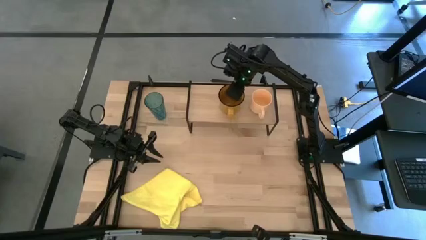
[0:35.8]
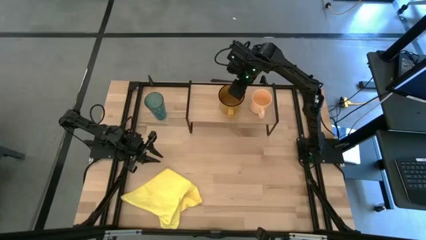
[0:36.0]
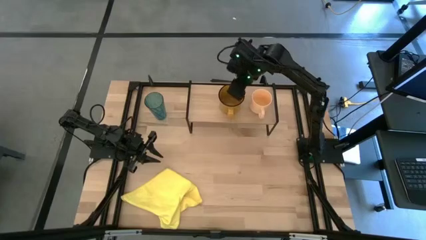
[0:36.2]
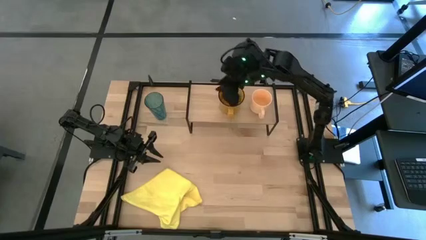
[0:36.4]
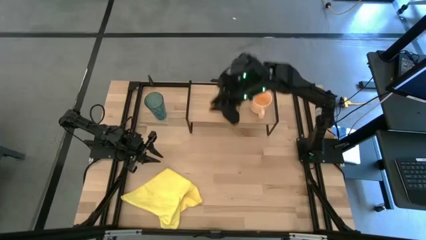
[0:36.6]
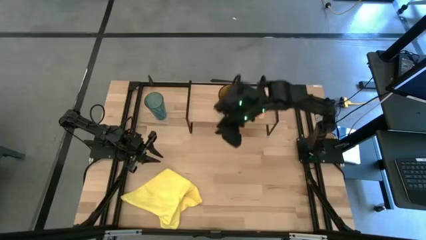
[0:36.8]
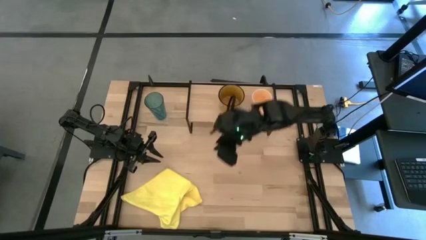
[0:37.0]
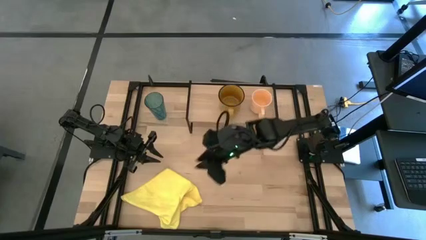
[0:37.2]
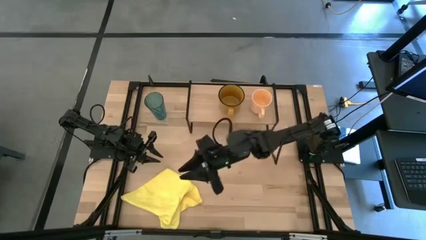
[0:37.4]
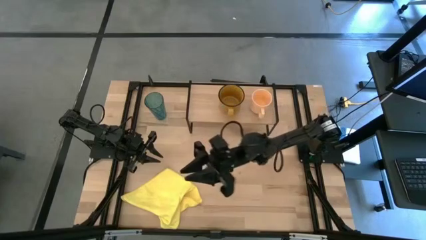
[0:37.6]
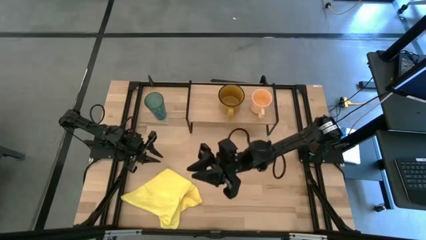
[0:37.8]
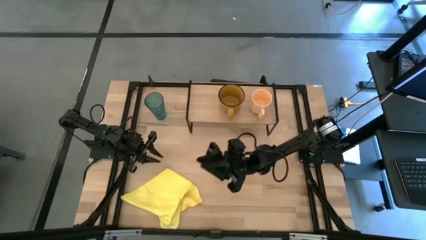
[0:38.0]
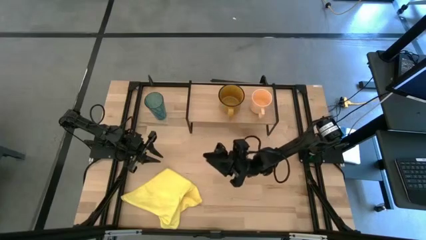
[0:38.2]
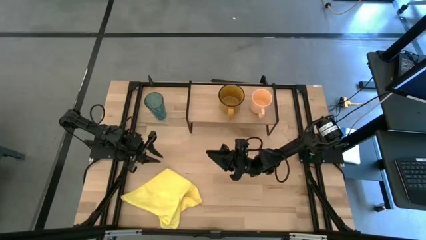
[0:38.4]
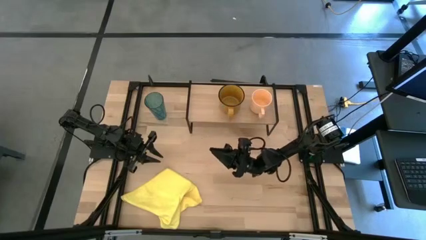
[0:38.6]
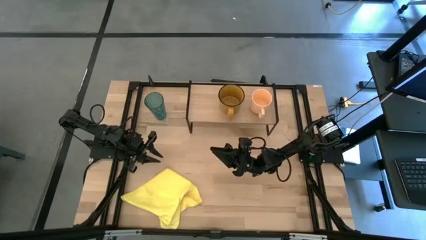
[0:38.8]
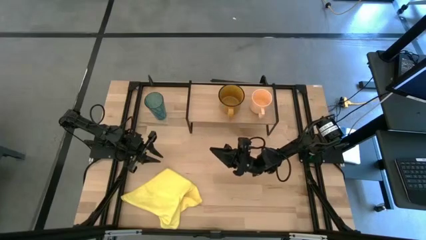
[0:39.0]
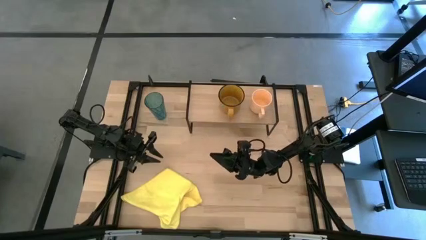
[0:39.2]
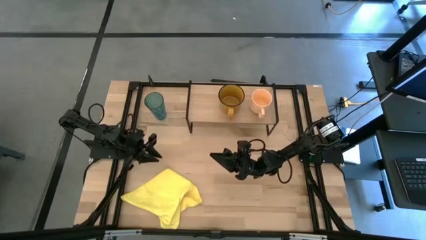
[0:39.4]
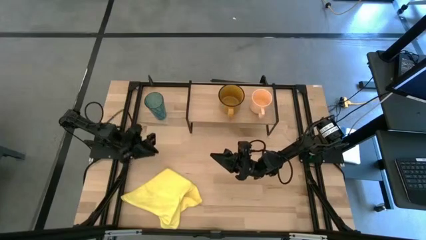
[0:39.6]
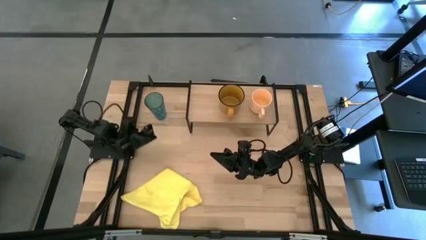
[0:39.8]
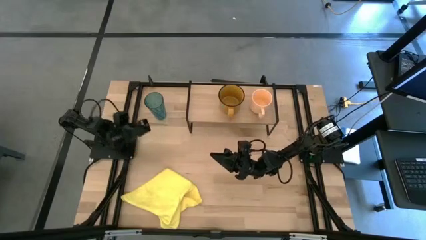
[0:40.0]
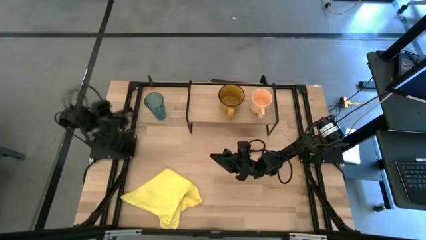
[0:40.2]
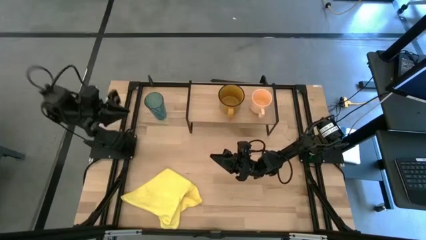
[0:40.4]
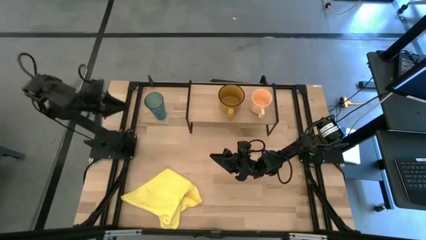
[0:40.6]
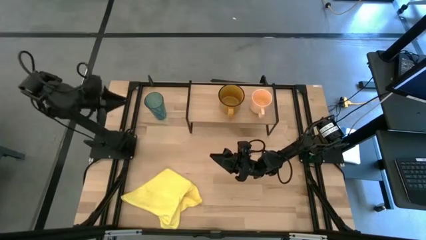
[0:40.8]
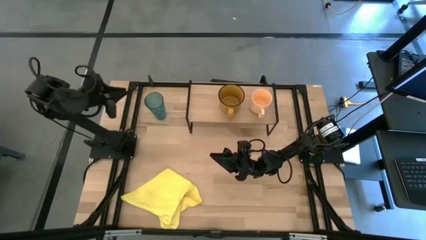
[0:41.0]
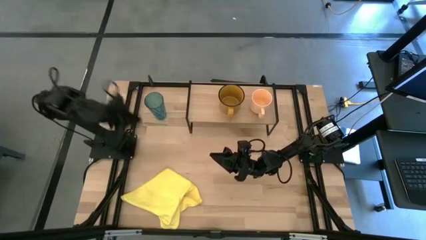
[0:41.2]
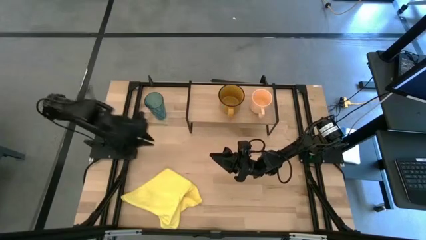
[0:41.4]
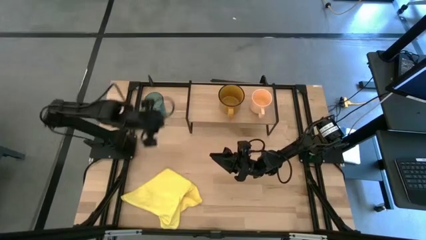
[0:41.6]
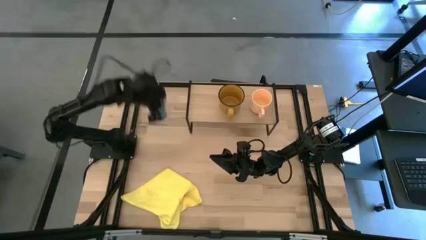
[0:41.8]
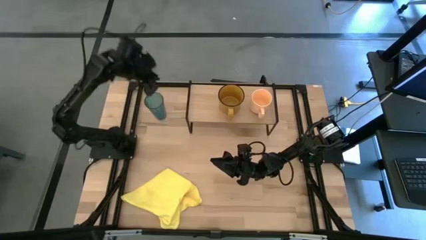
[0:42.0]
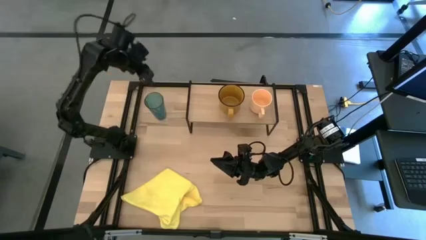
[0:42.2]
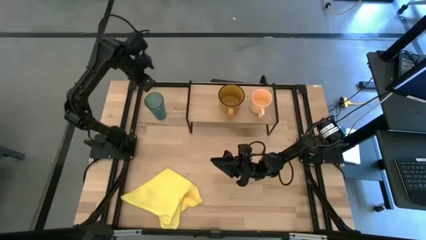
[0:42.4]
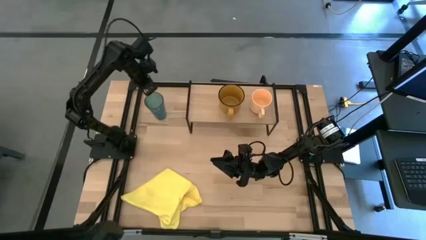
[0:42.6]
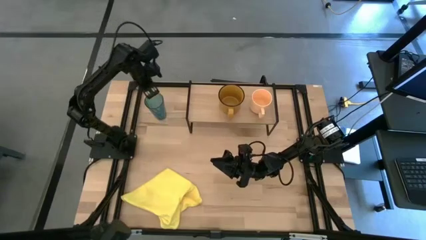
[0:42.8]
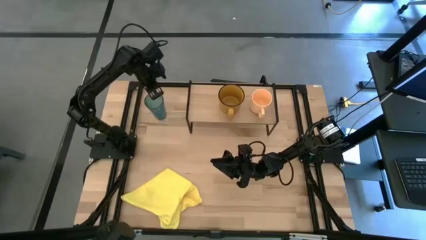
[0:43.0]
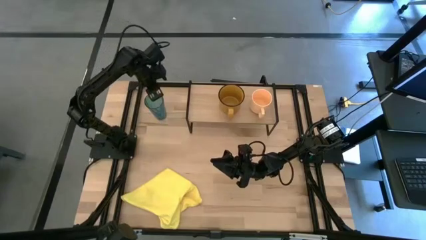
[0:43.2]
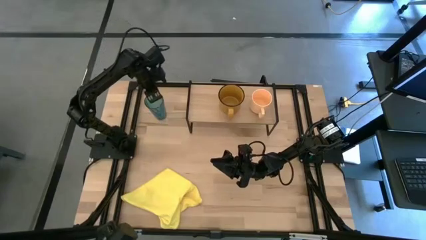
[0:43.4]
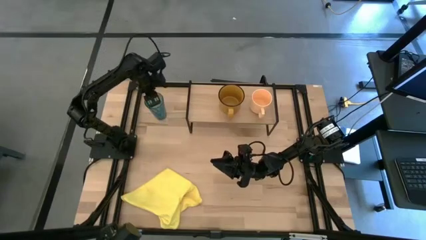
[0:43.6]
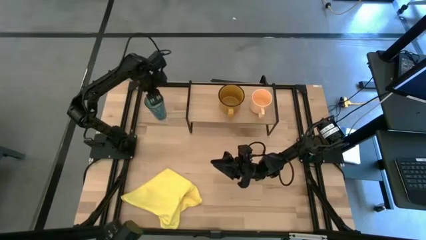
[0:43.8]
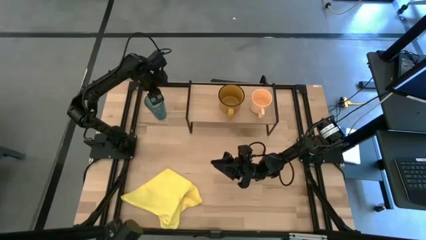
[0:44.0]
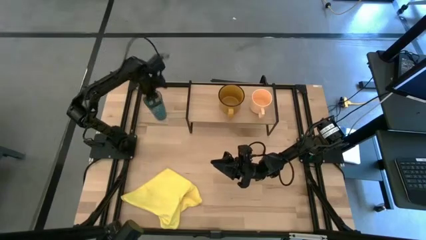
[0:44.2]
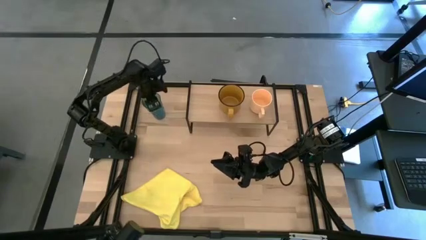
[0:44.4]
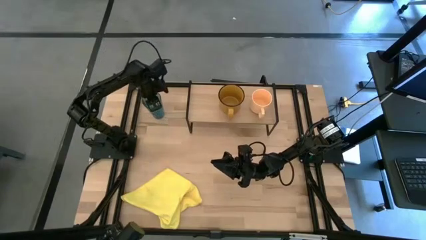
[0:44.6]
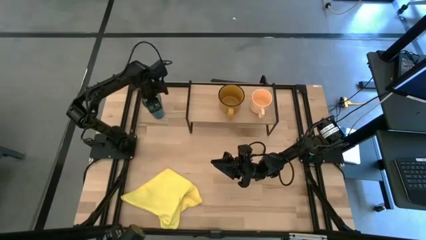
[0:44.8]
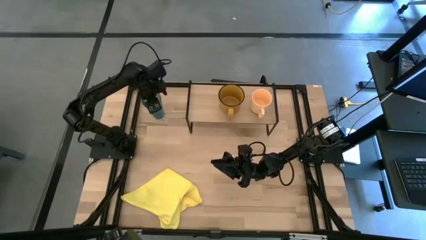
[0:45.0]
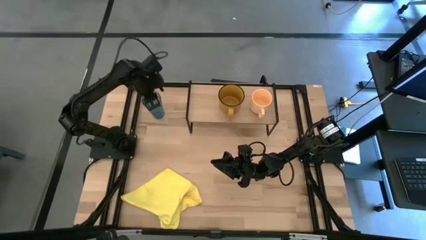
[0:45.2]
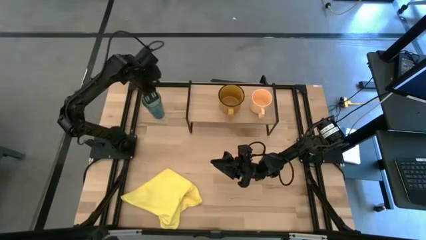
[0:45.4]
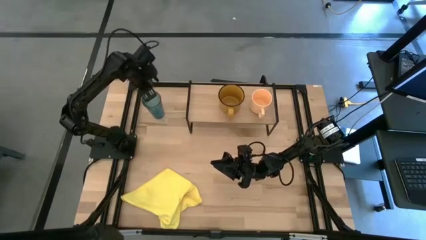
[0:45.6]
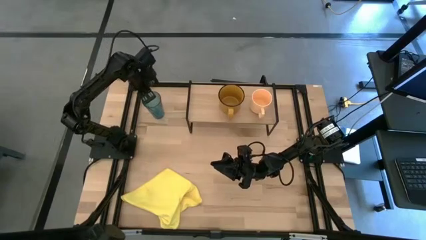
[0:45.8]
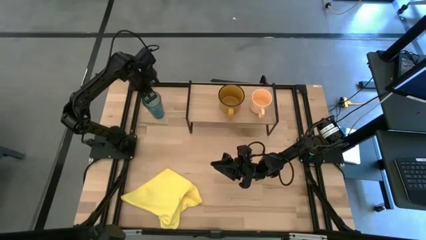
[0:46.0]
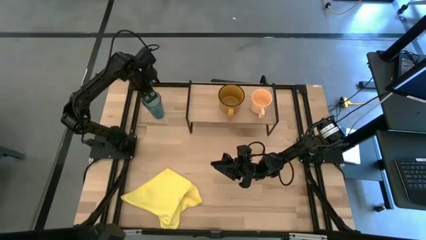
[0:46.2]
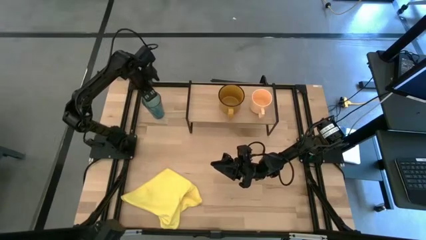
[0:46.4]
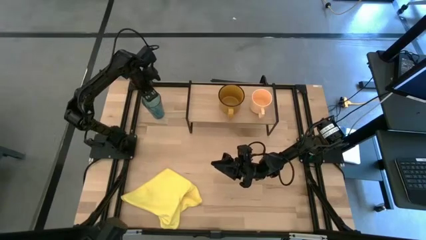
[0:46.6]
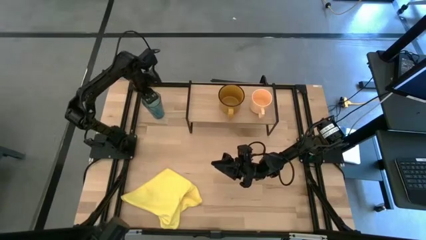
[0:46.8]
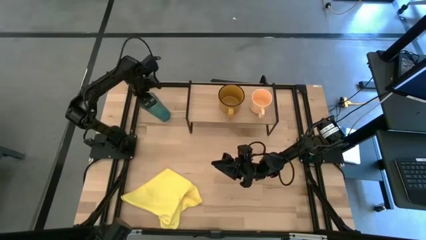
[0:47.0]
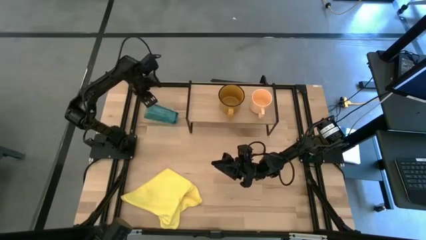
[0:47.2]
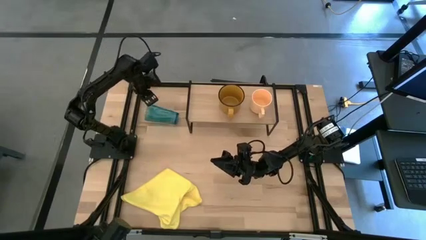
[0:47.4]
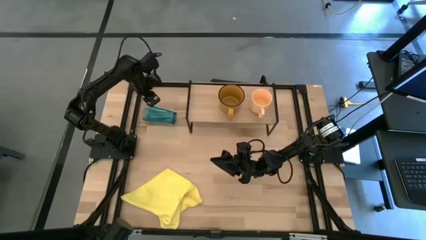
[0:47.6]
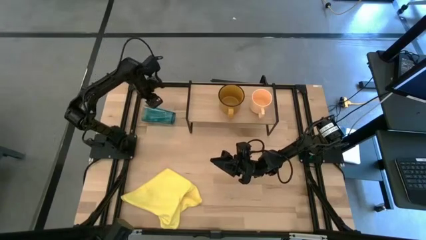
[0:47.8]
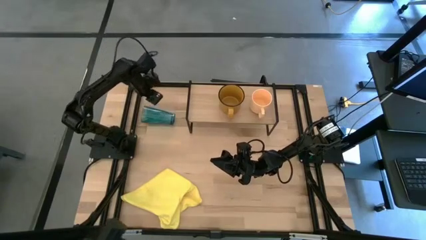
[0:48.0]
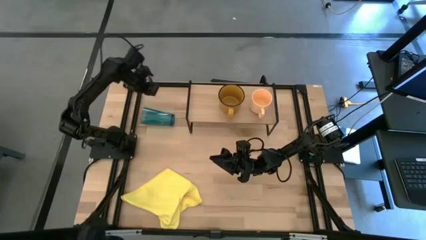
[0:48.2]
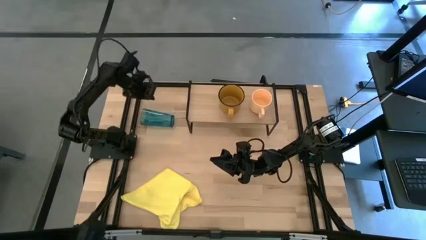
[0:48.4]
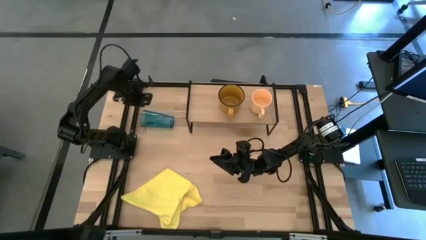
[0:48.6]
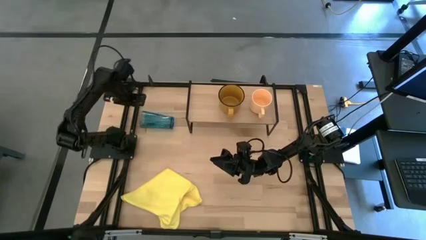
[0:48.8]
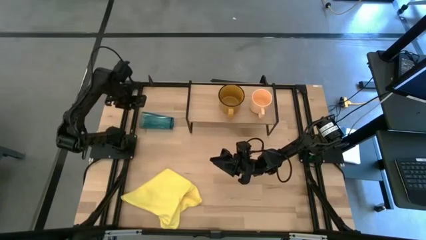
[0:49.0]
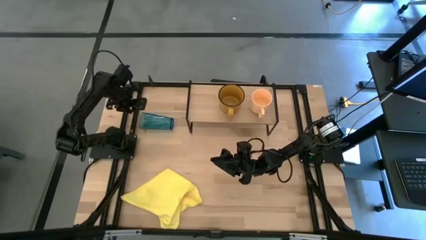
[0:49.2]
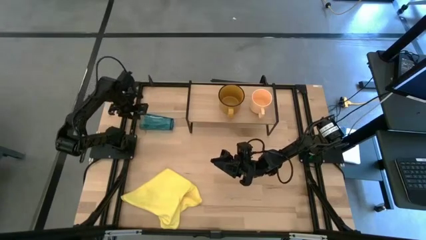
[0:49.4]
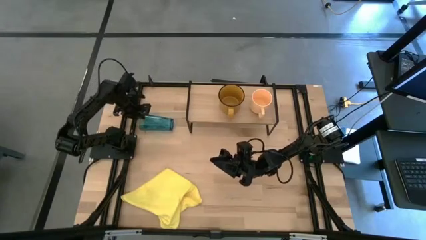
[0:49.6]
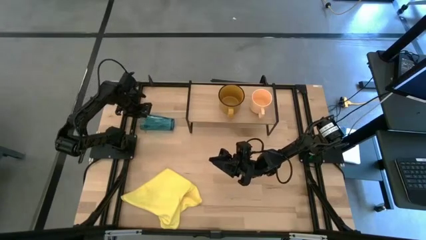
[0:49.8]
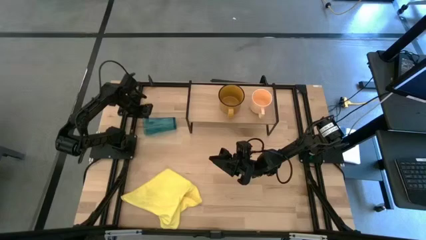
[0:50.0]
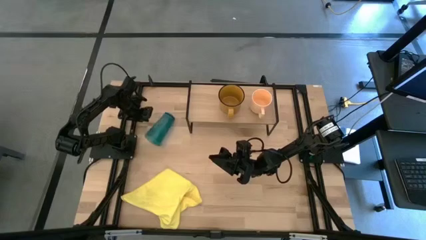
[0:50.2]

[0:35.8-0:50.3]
Task: Stack small to large cups/mugs on shelf
Put the blue glass on the shelf

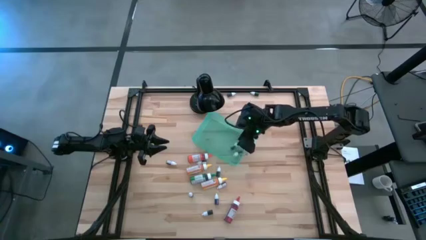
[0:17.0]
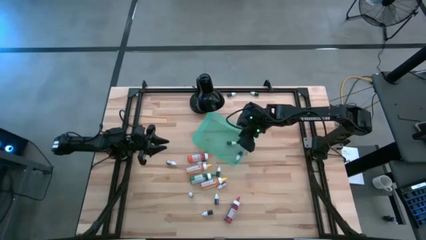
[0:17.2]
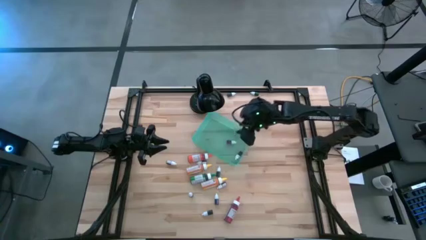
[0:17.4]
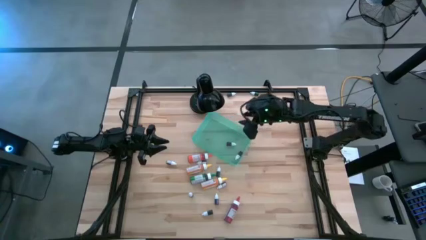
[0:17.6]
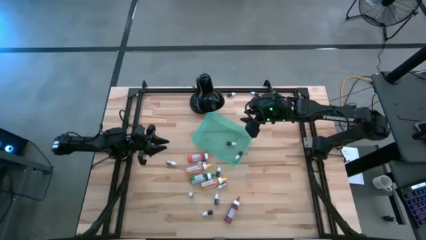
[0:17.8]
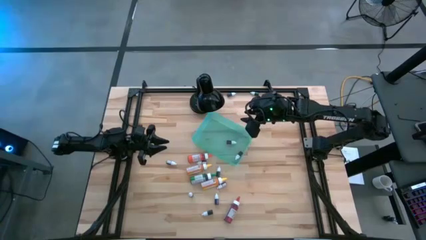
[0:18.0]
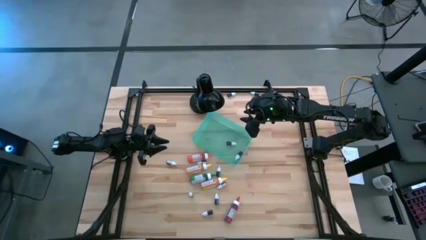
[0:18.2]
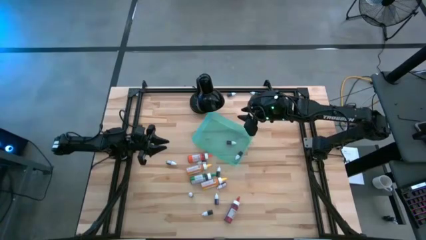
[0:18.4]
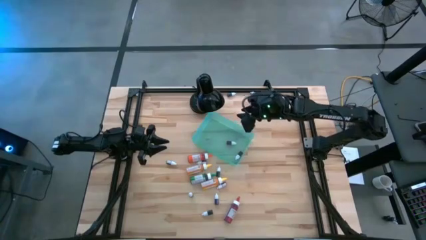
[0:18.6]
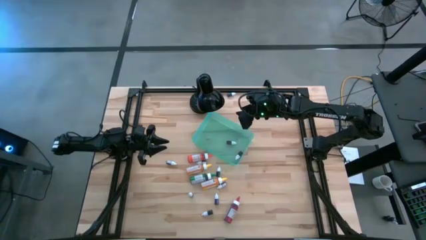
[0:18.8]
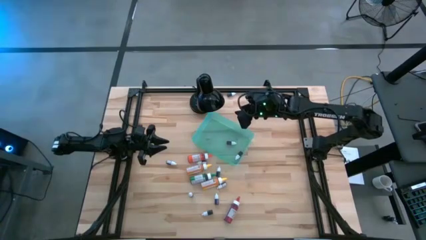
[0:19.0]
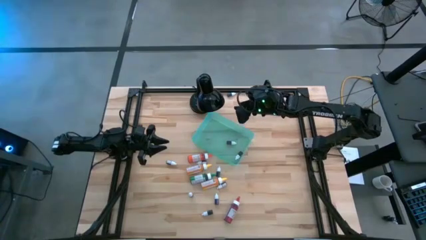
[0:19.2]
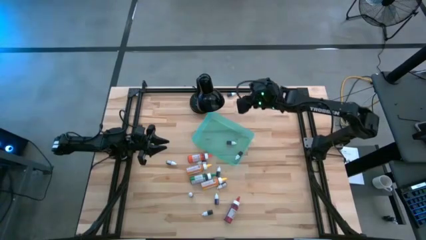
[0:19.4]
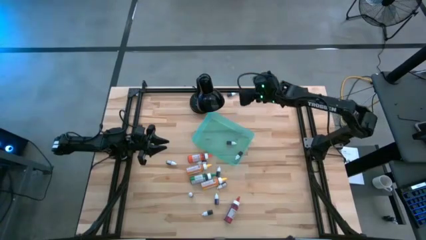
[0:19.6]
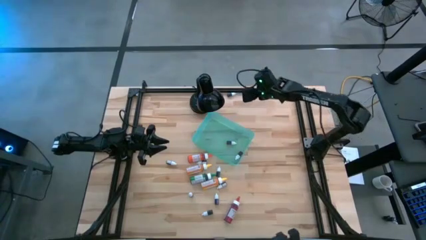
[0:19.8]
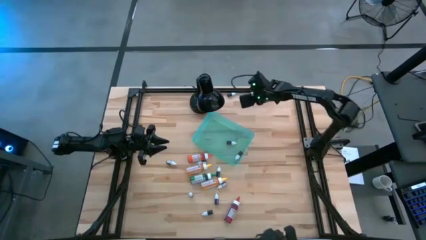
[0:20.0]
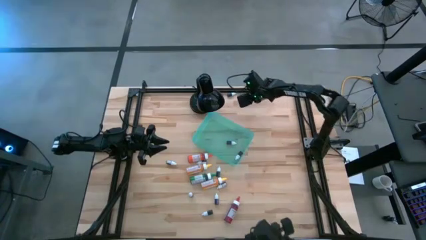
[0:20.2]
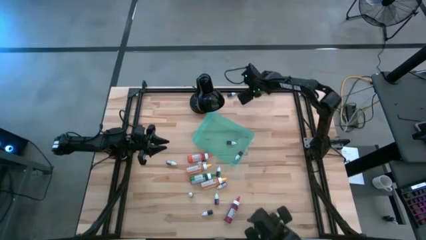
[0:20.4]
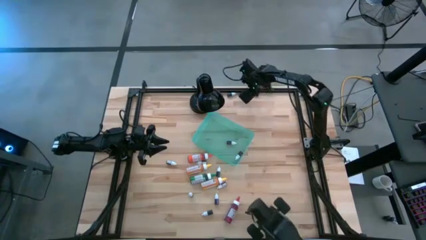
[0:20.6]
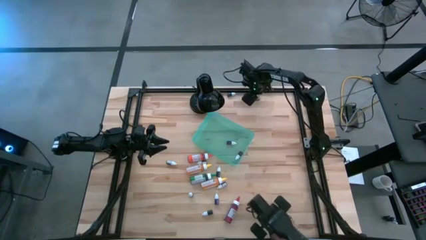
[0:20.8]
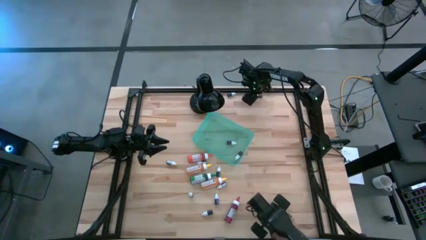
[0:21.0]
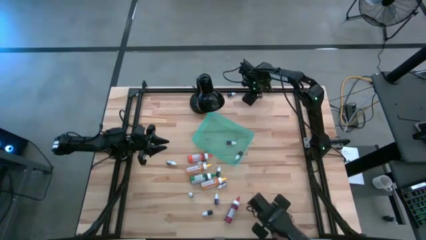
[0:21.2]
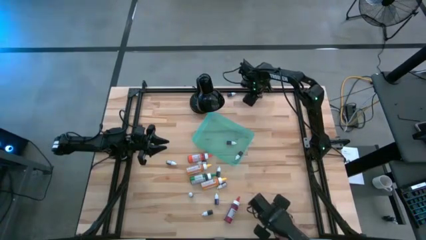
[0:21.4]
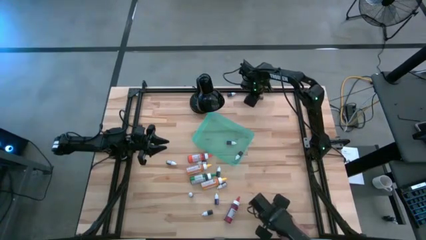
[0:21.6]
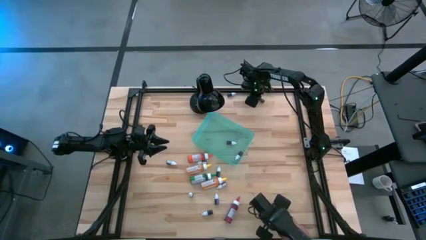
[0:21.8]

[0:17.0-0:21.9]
Task: Pick & Place food coloring
Put the small green food coloring bottle into the green bin
